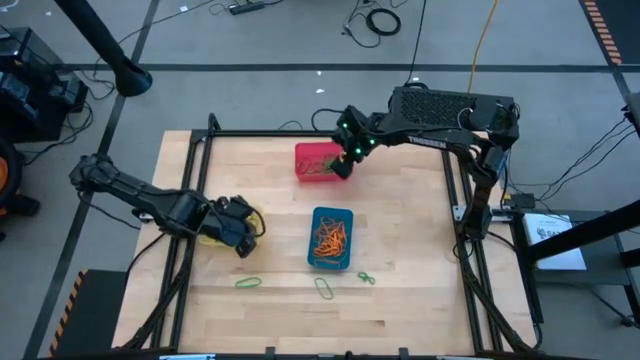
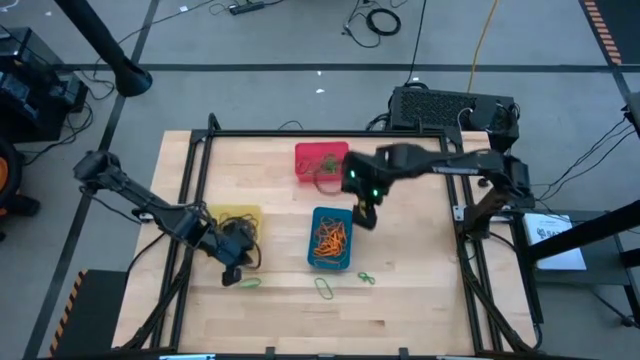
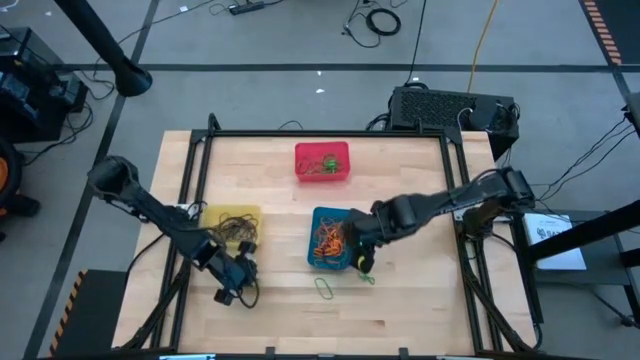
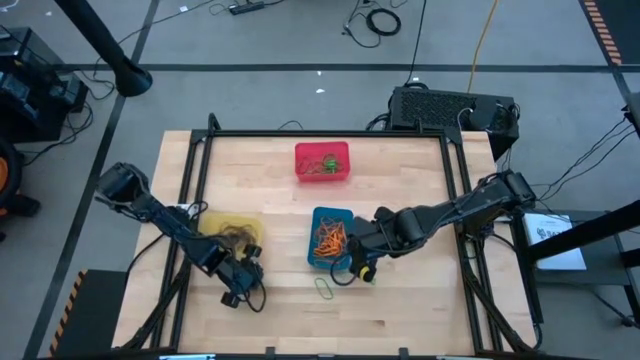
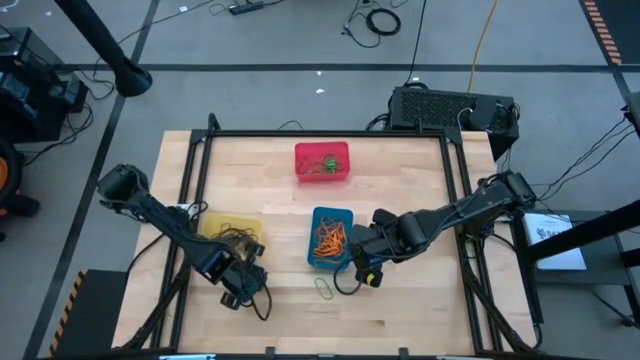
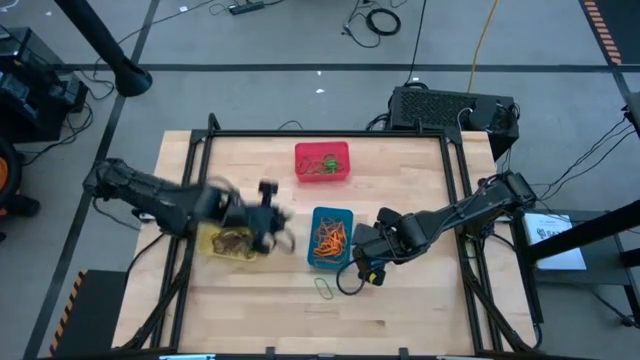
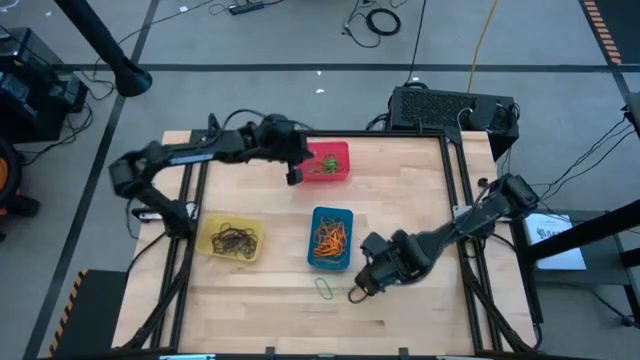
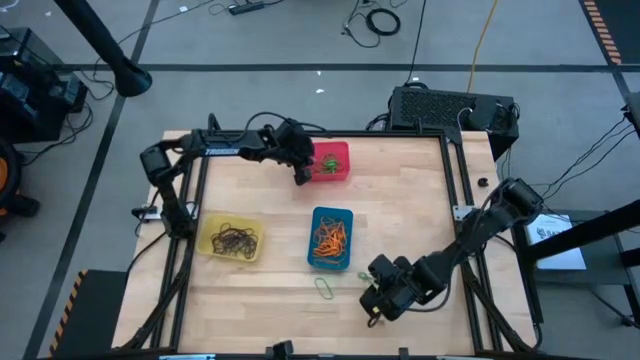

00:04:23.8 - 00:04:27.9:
Task: Sort rubber bands into baskets
Put the green rubber band into the red bin

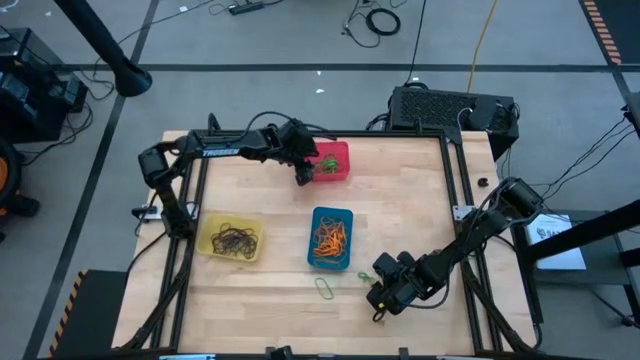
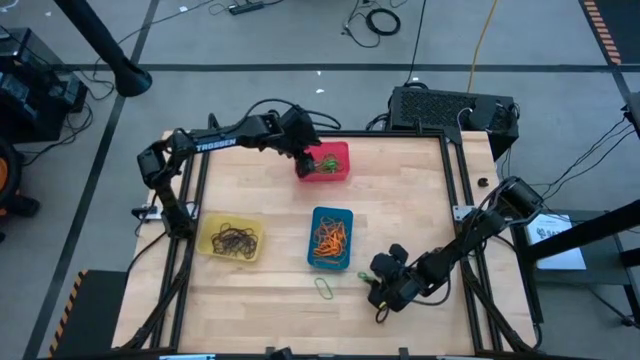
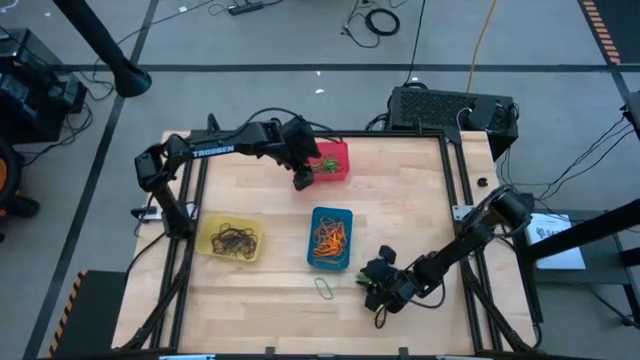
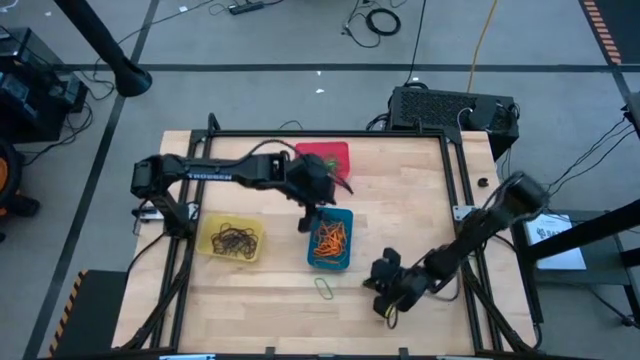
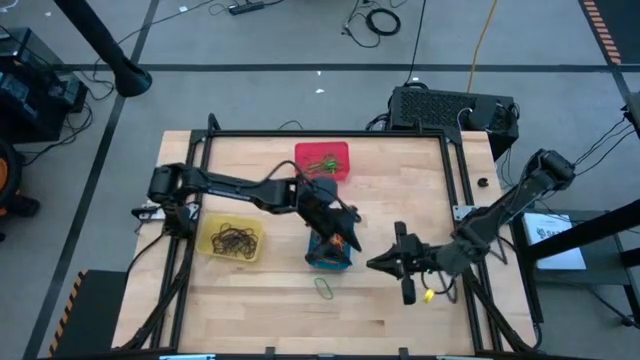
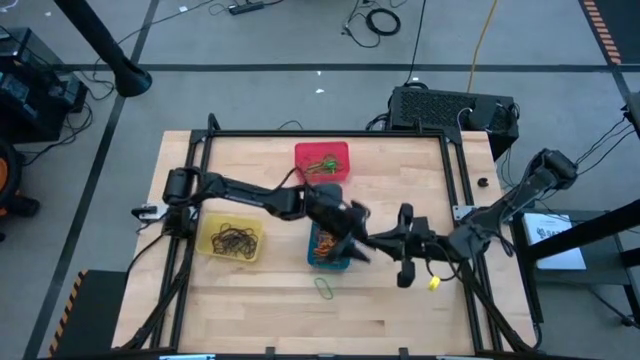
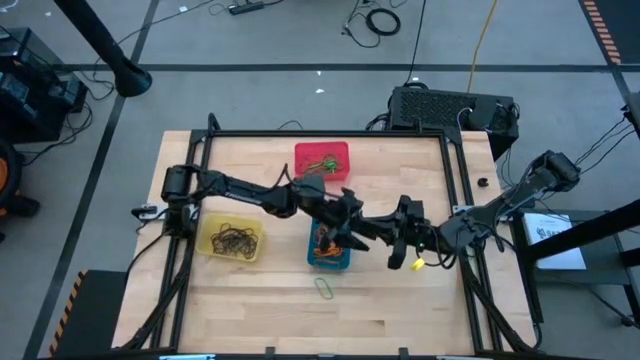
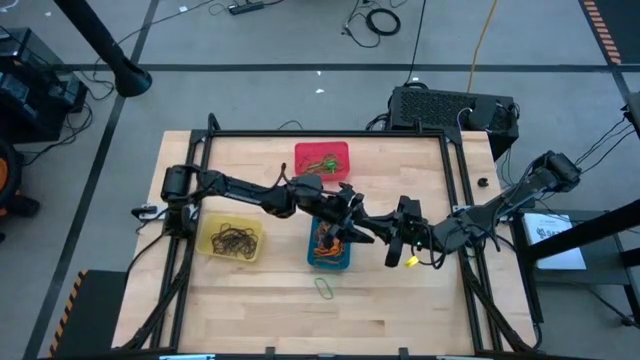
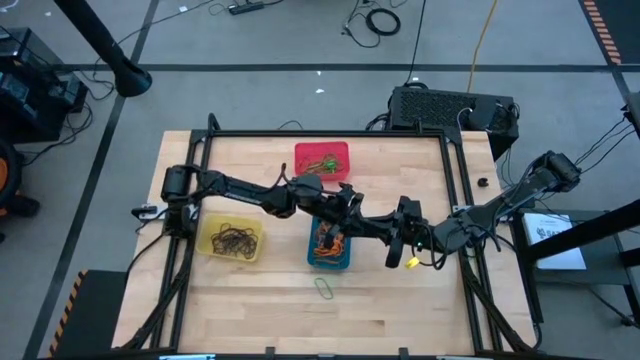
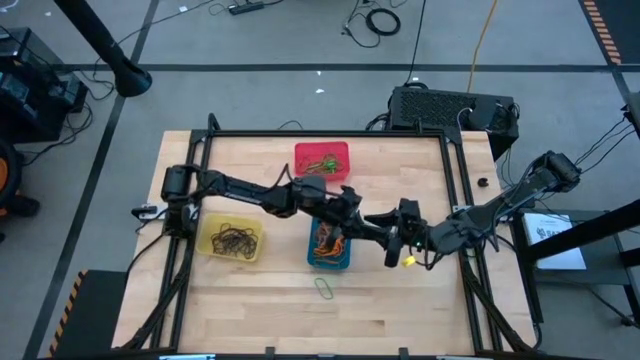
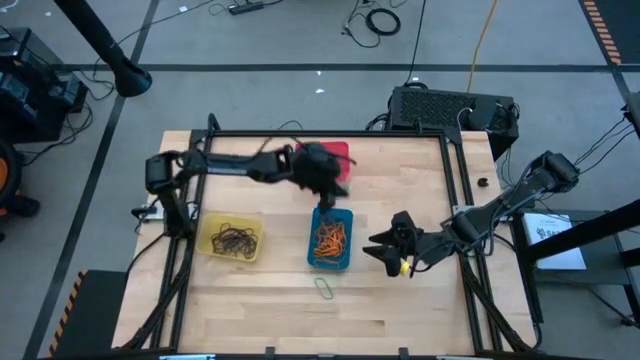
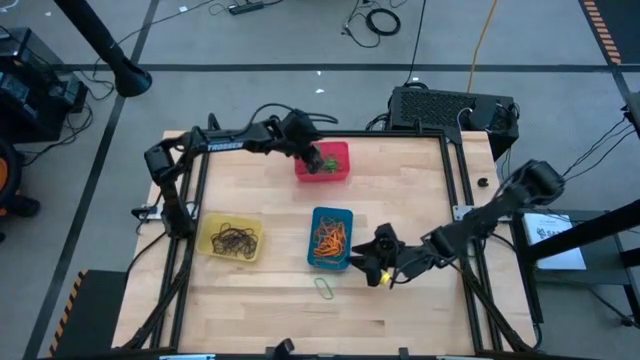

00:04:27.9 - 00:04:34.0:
Put the green rubber band into the red bin

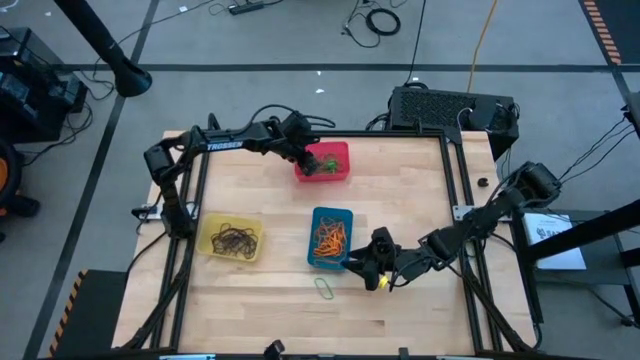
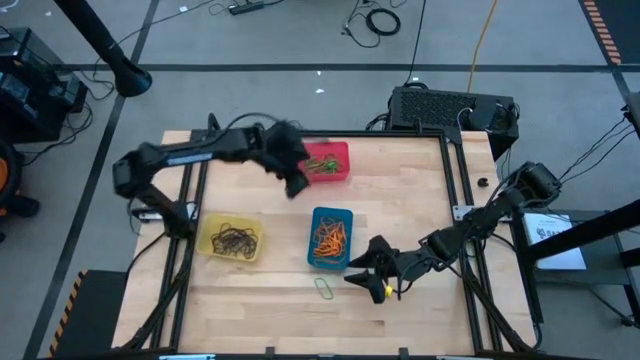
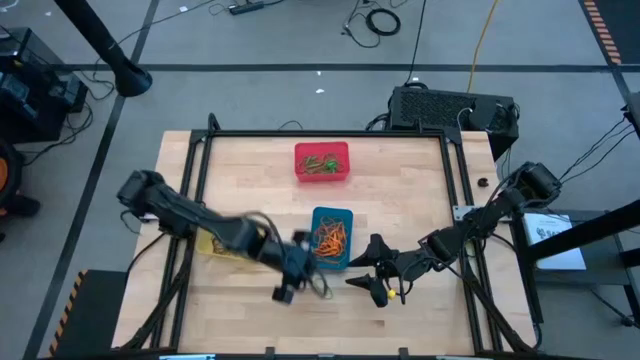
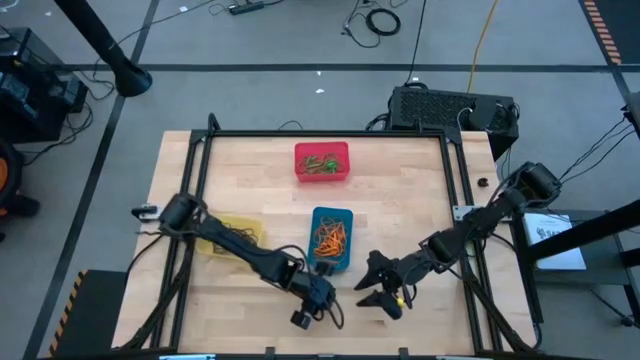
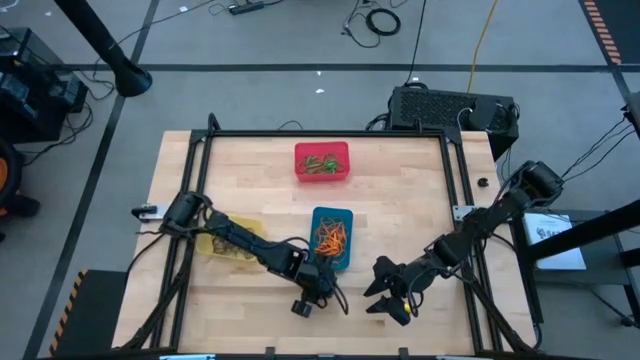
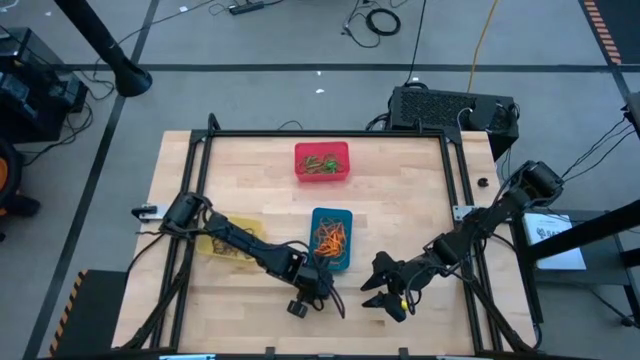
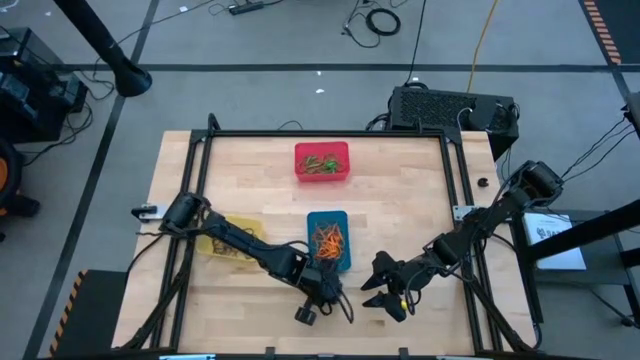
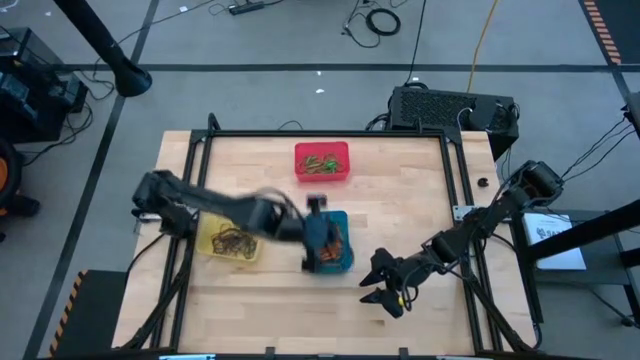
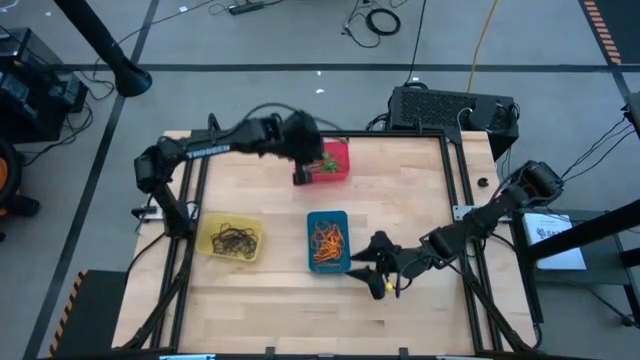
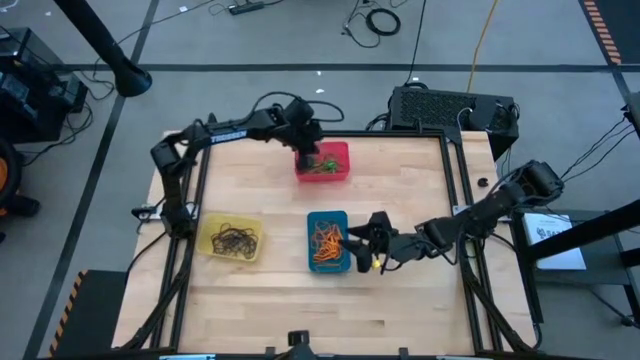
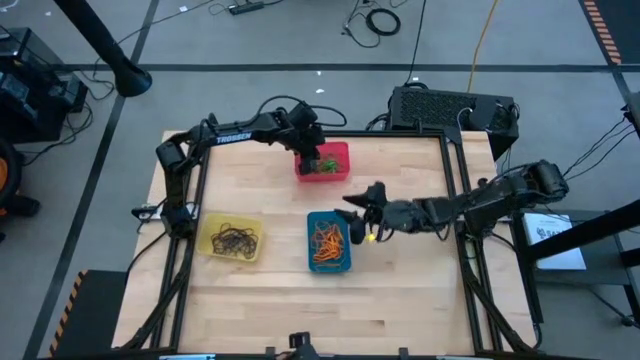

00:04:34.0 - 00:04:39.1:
Put the green rubber band into the red bin

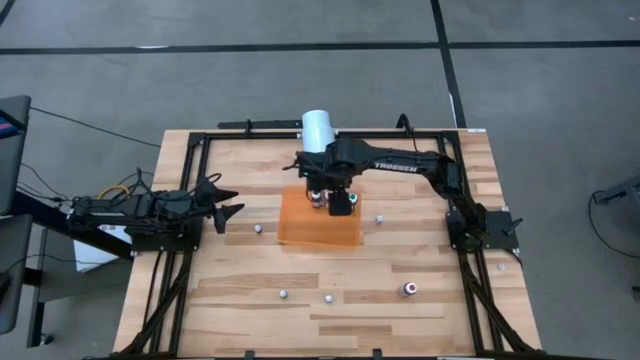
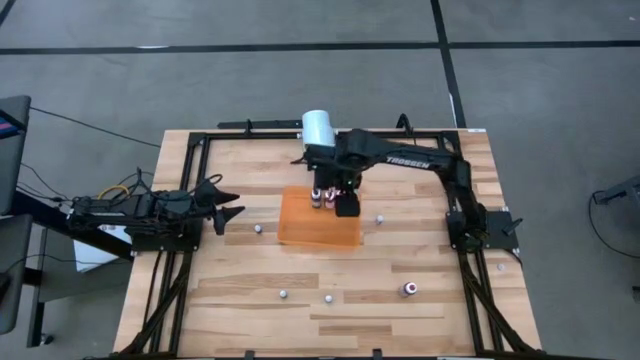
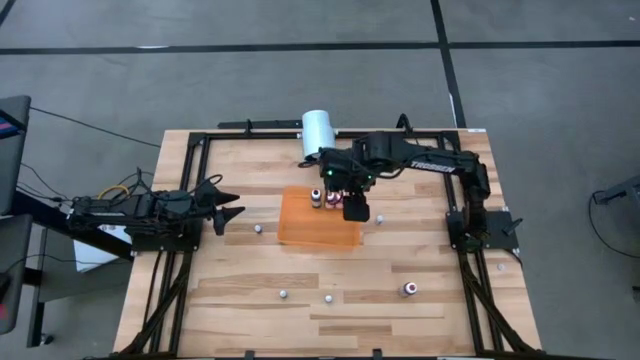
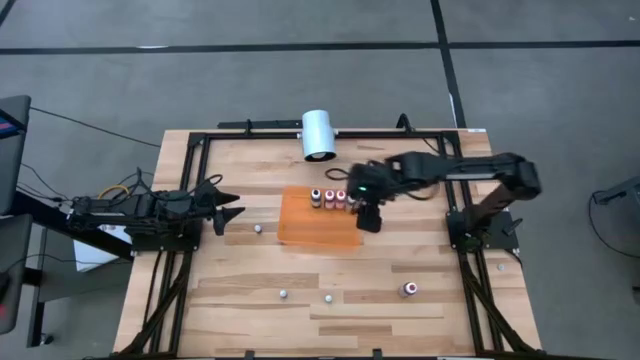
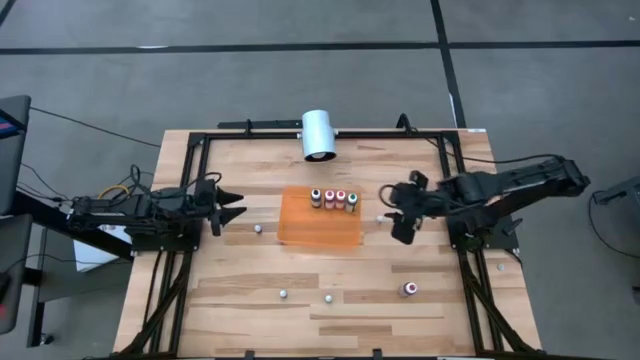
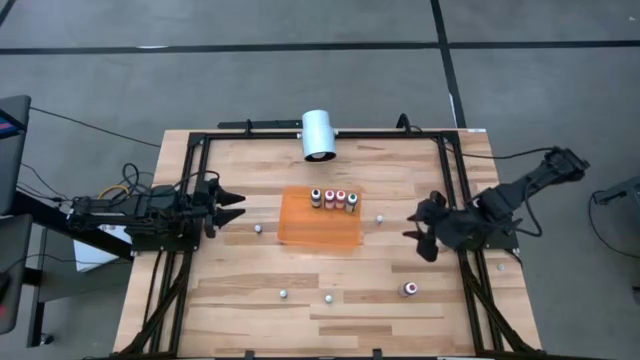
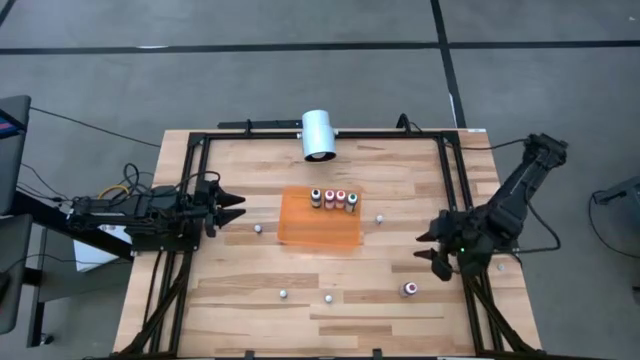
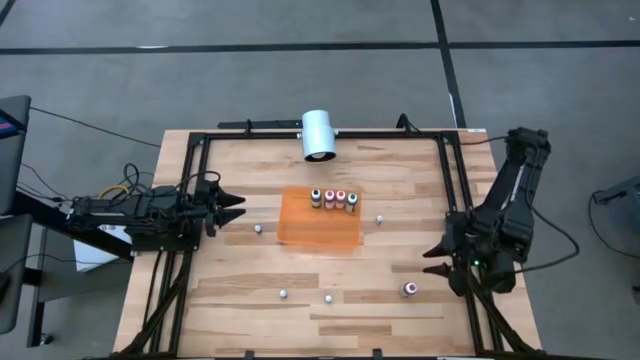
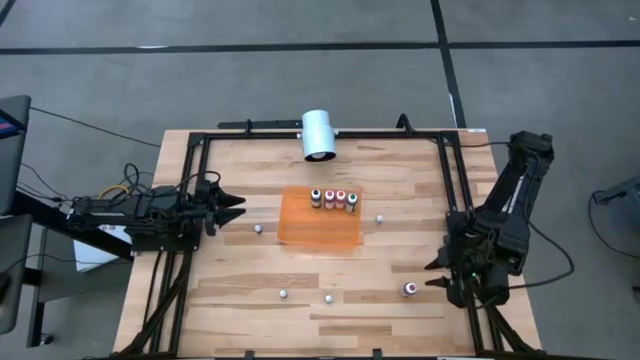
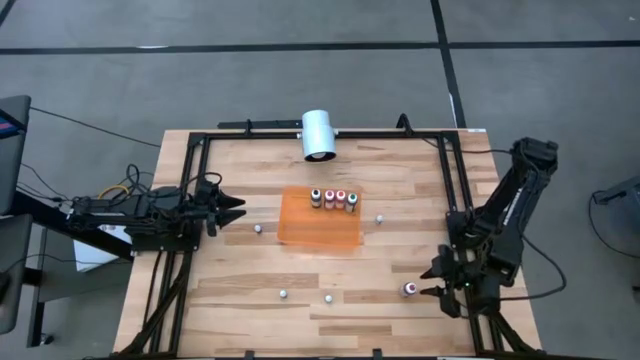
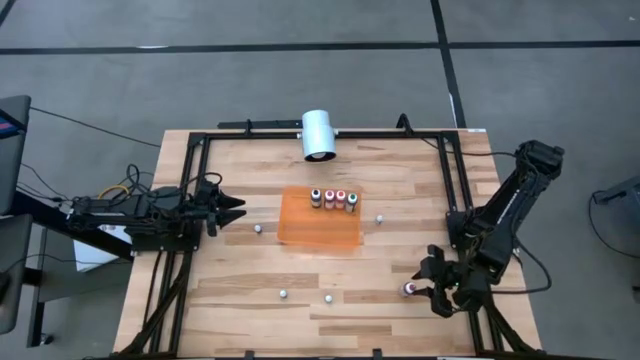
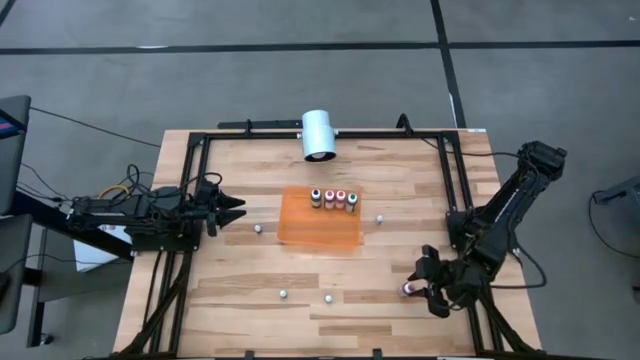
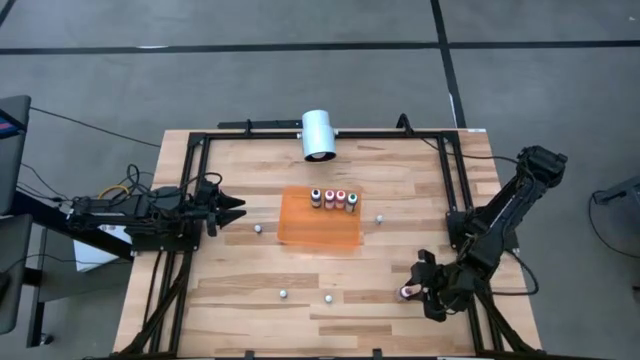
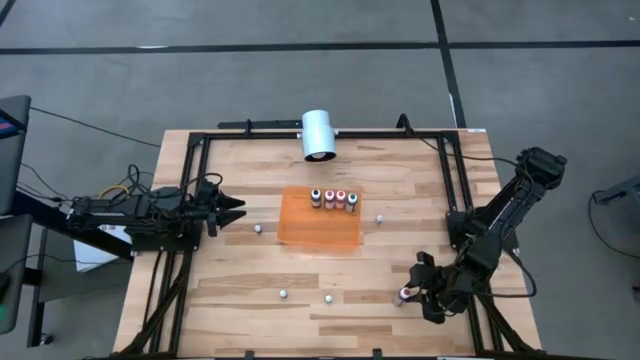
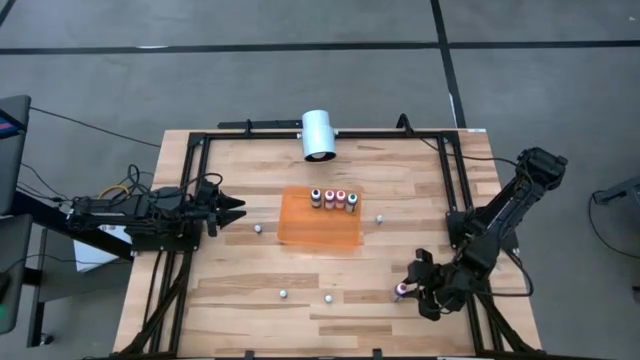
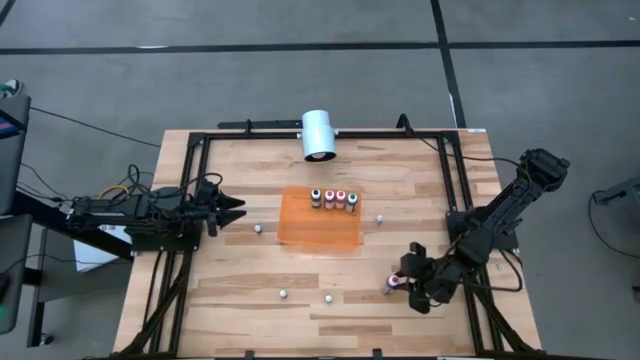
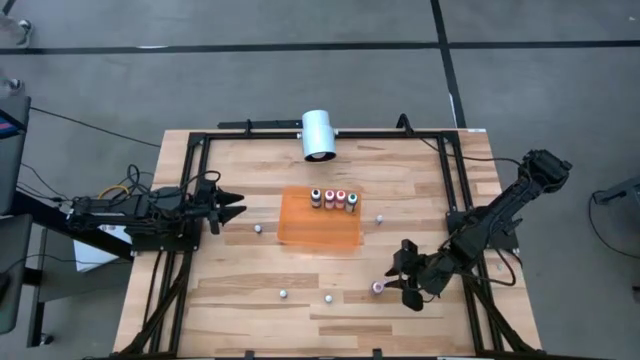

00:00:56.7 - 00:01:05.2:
Task: Pick & Place food coloring
Put the large red food coloring bottle into the orange bin
